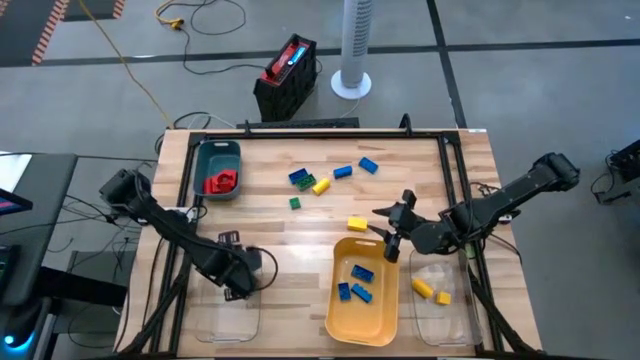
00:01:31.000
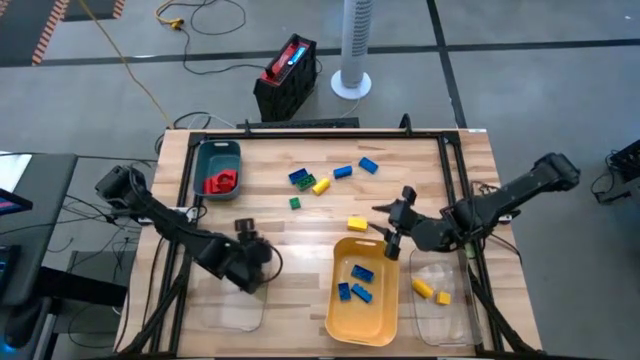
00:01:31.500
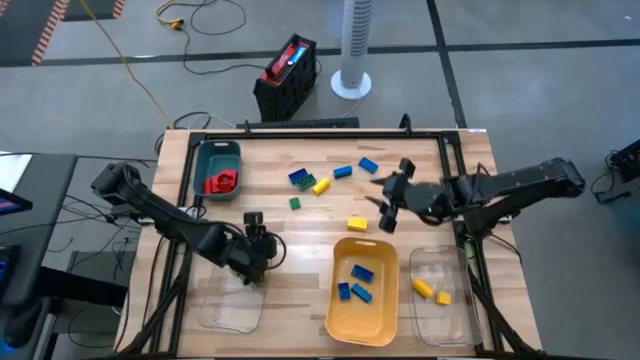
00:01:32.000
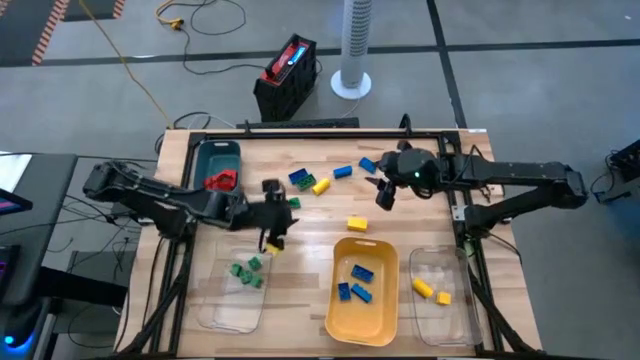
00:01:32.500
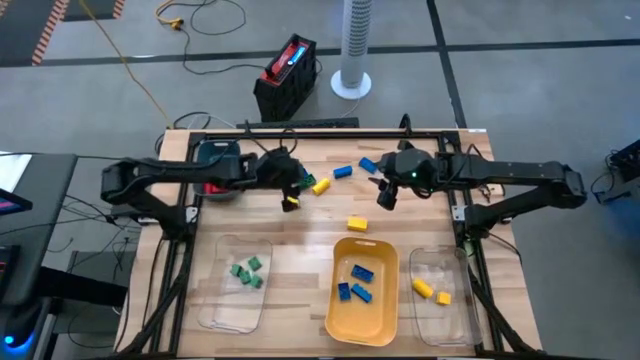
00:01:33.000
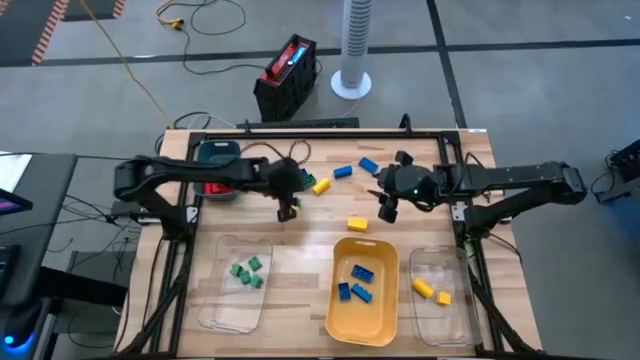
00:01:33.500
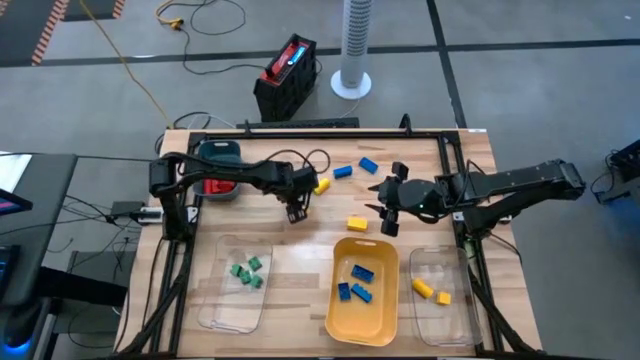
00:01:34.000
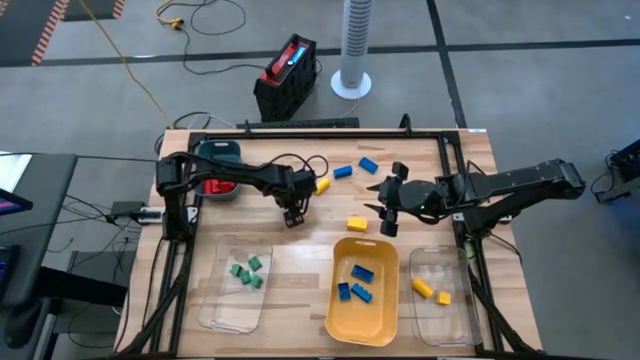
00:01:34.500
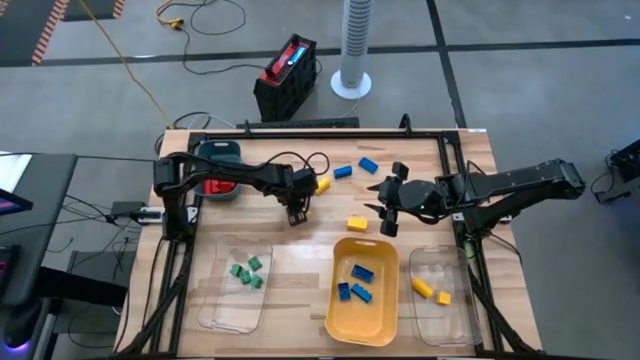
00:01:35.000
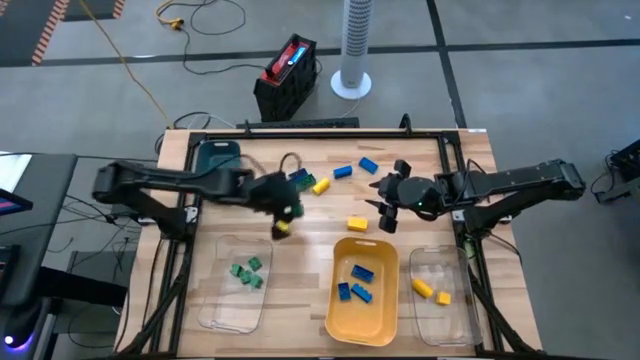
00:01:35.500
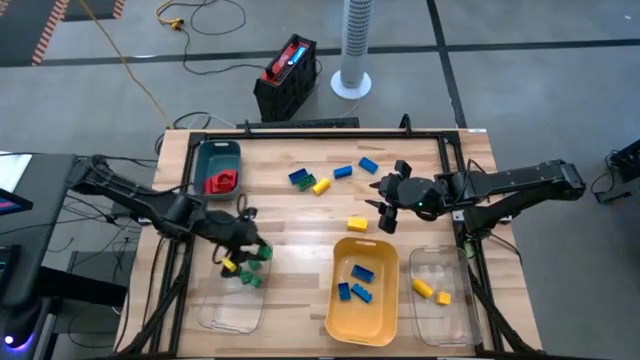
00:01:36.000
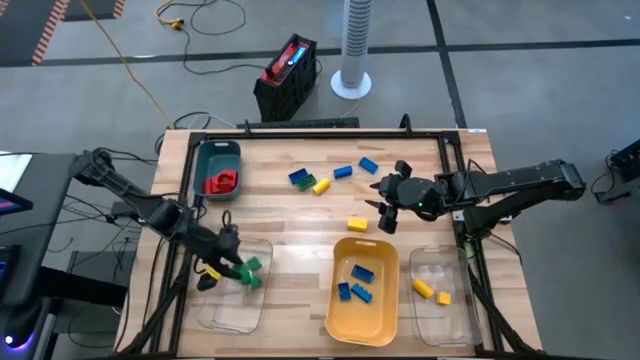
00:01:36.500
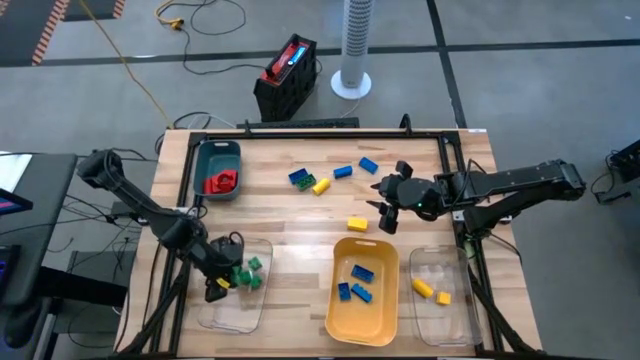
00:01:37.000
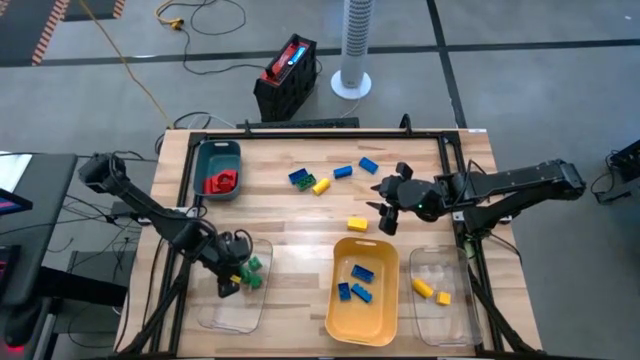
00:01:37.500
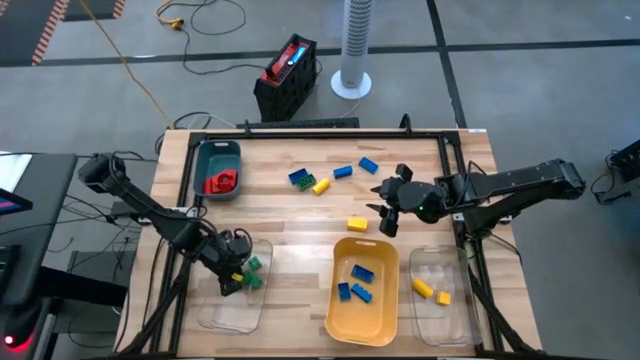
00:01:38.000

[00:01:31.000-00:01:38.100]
Task: Sort blocks
Put the green game piece into the left transparent bin

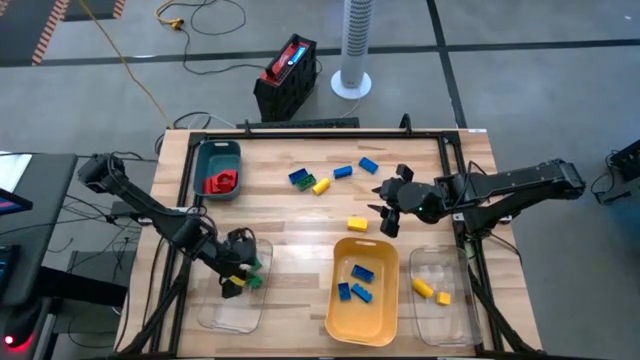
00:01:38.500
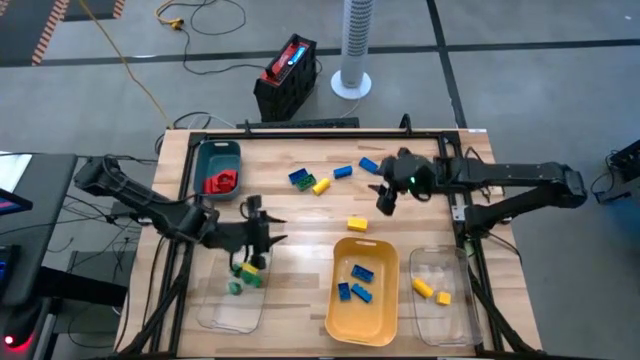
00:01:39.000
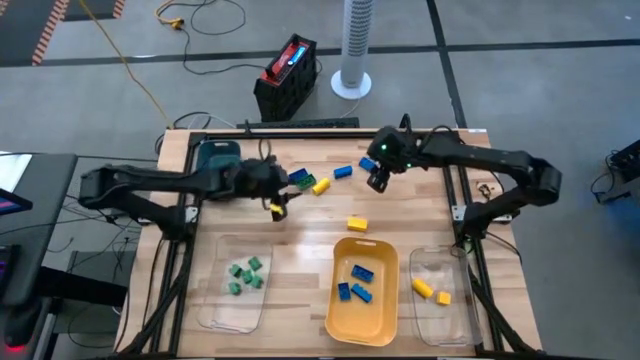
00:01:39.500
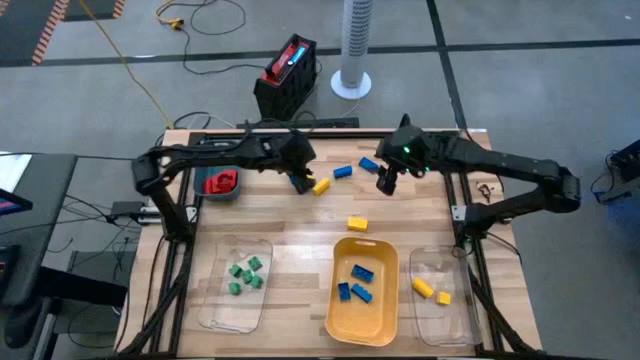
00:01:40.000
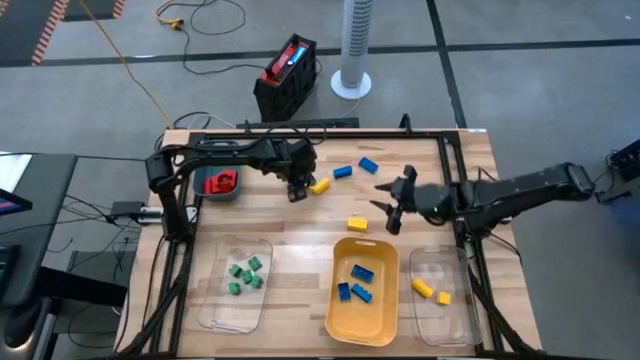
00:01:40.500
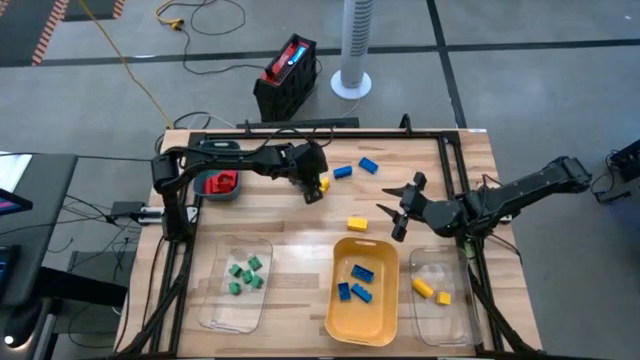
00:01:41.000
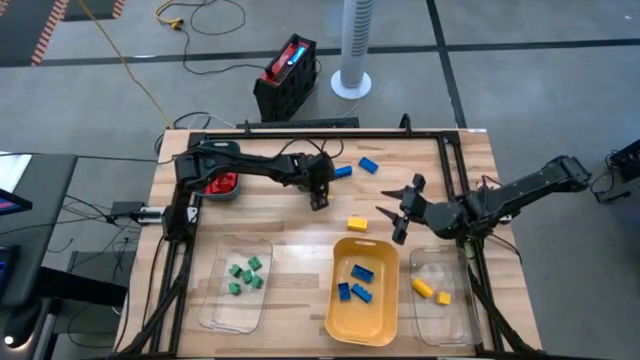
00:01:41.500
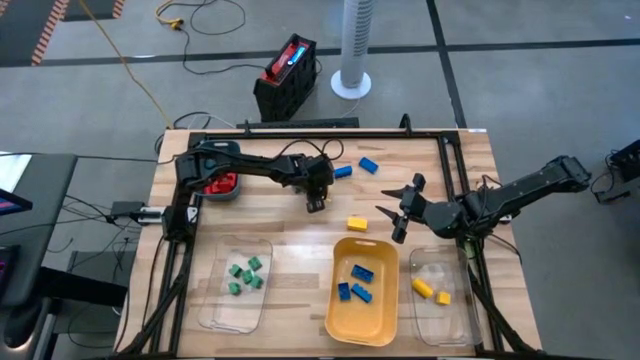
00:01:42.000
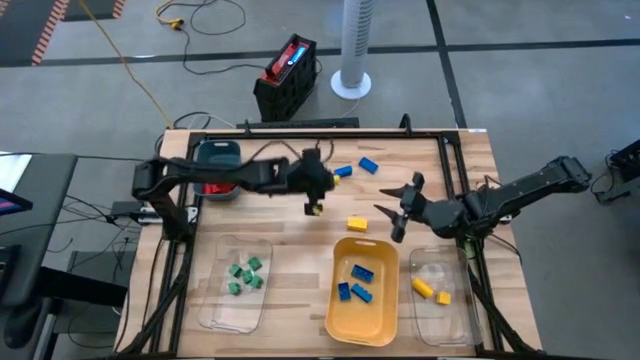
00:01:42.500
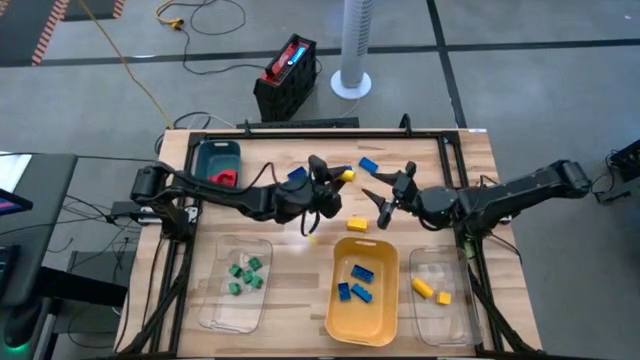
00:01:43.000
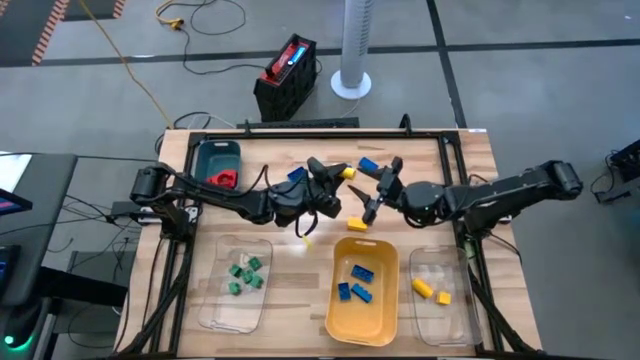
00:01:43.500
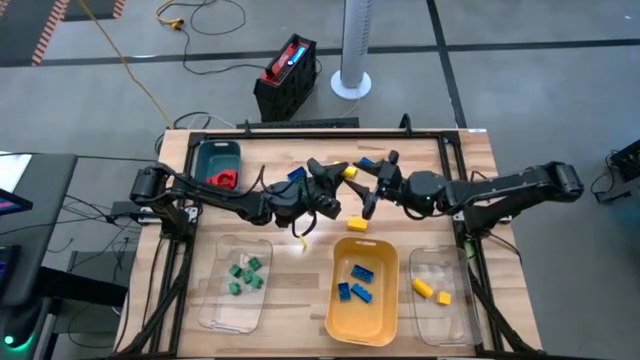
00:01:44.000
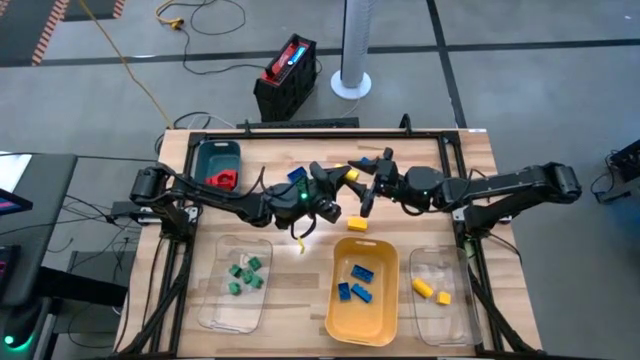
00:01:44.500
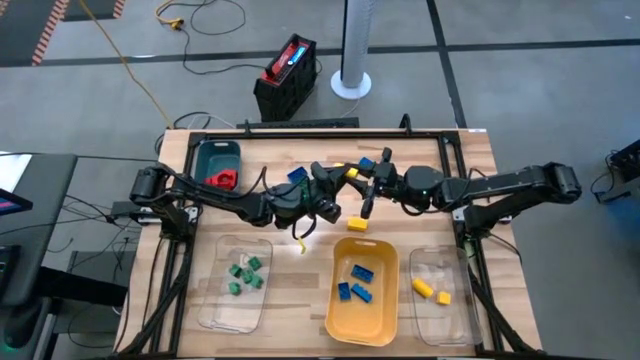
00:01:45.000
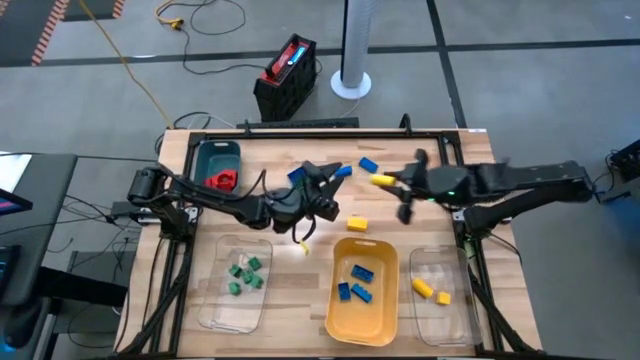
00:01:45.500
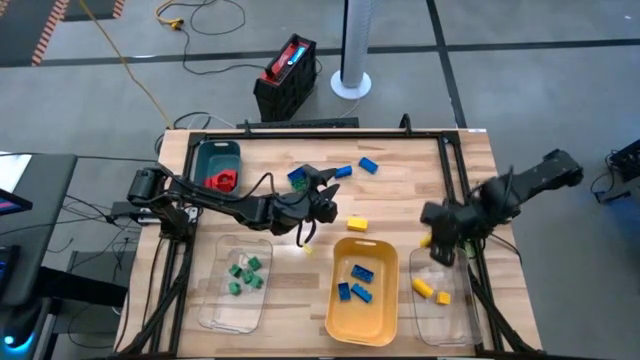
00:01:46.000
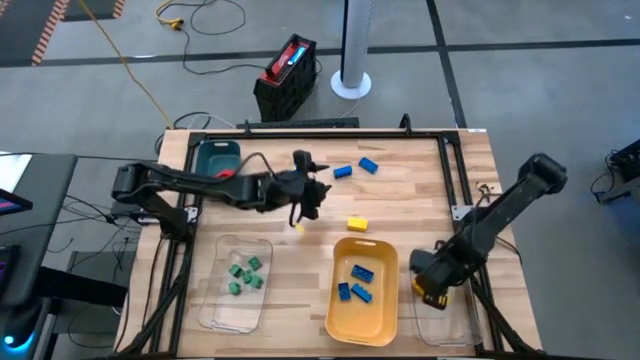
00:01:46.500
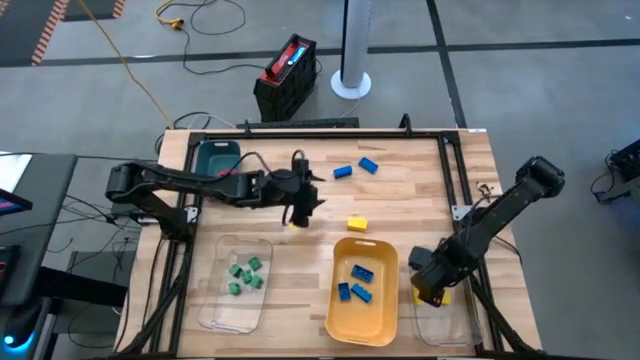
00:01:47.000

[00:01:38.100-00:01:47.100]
Put the yellow wooden block into the right transparent bin

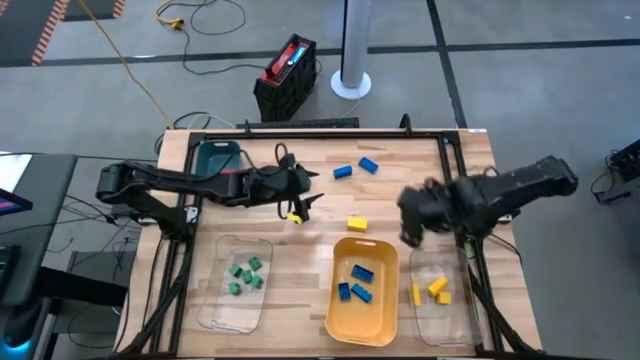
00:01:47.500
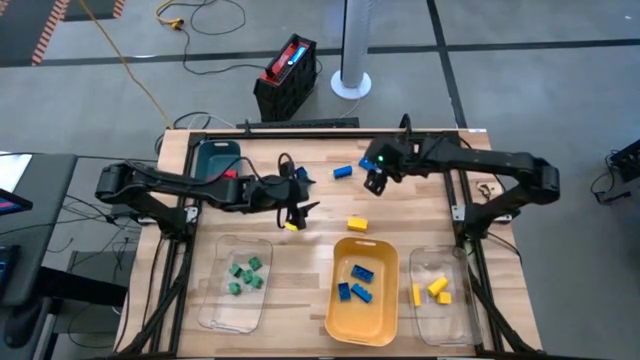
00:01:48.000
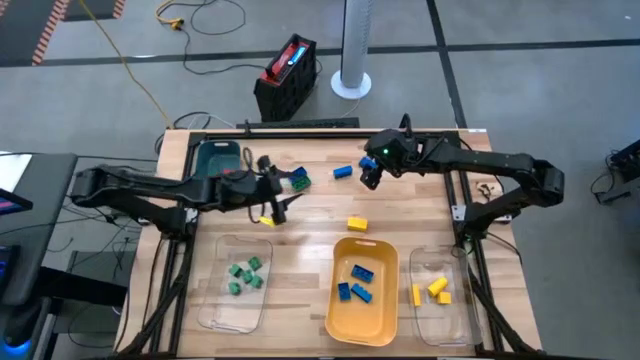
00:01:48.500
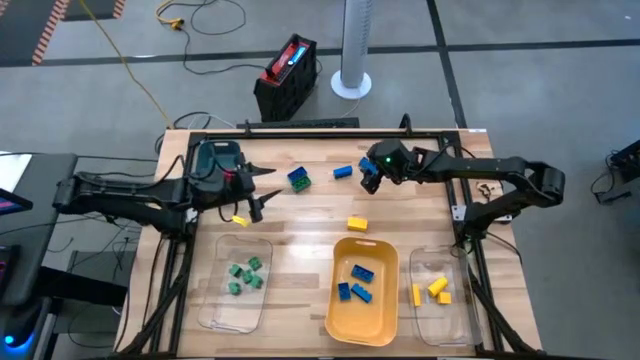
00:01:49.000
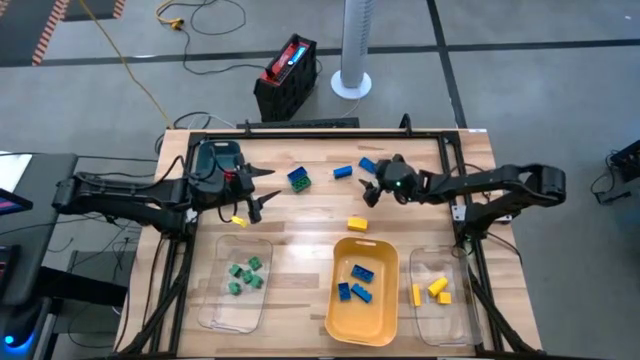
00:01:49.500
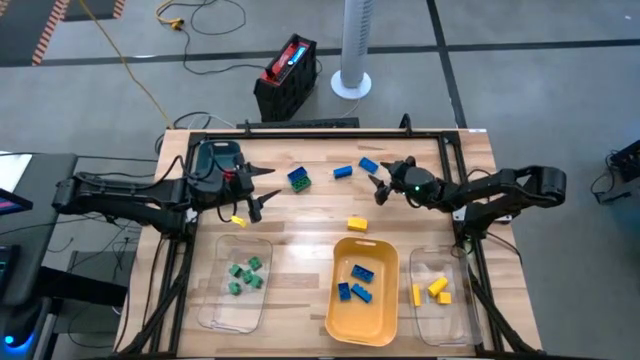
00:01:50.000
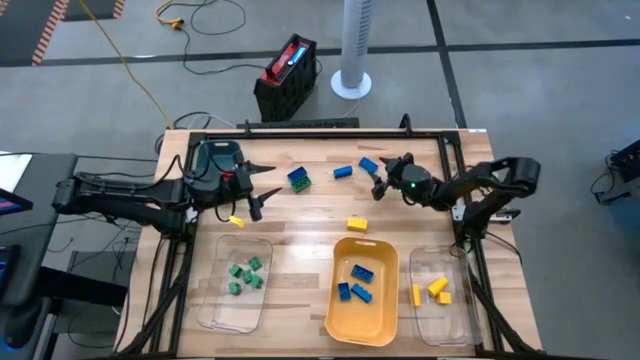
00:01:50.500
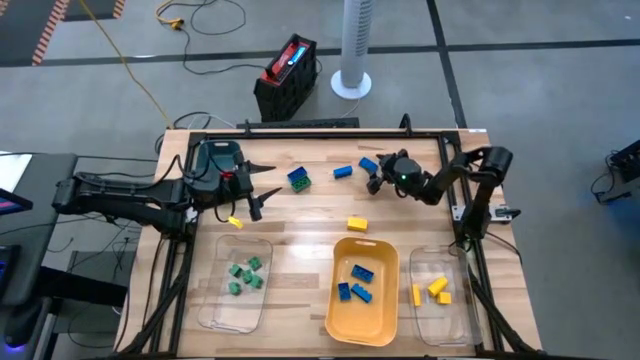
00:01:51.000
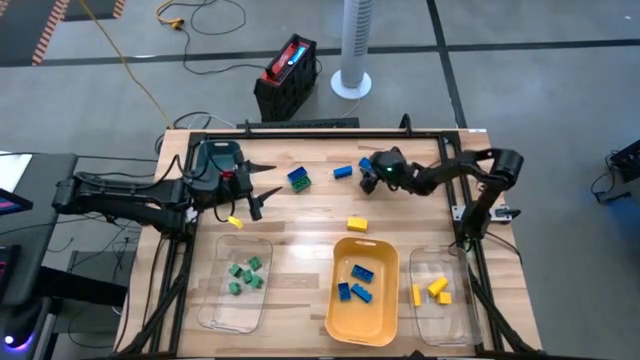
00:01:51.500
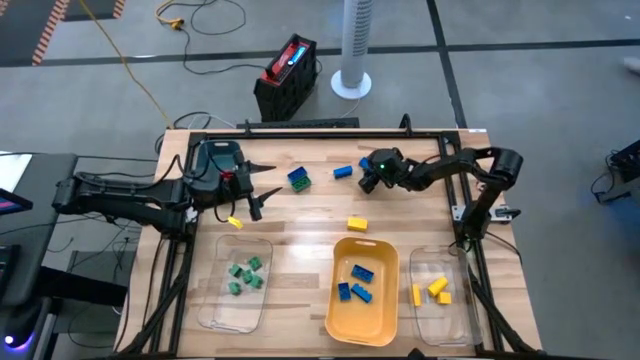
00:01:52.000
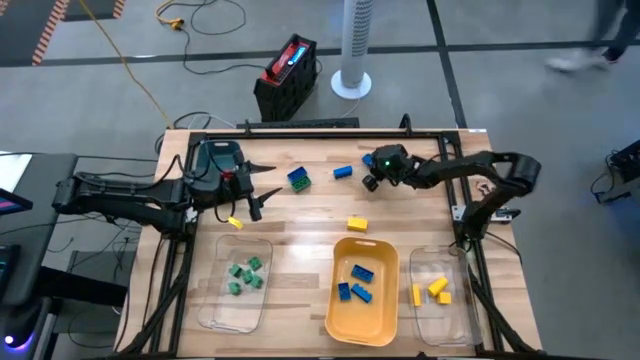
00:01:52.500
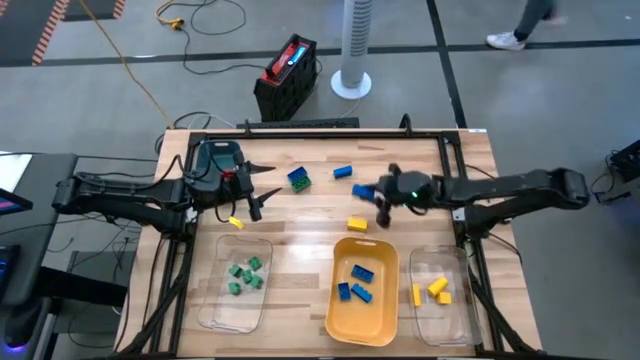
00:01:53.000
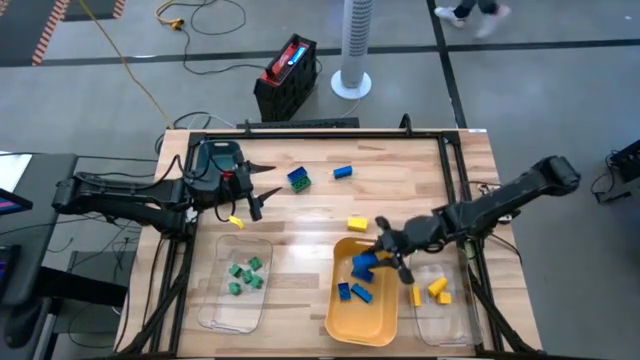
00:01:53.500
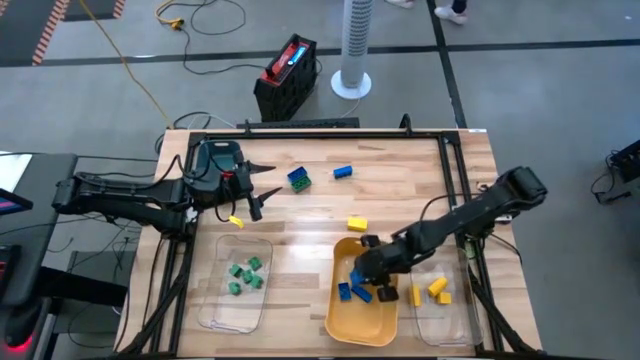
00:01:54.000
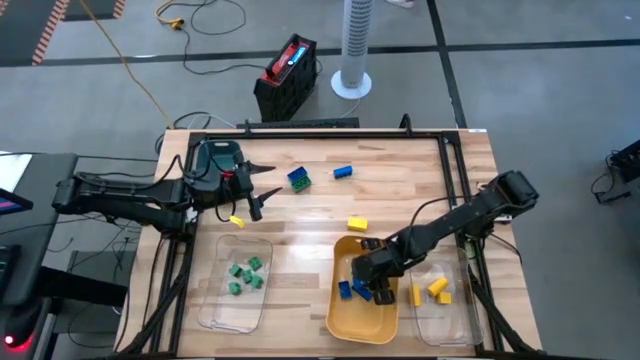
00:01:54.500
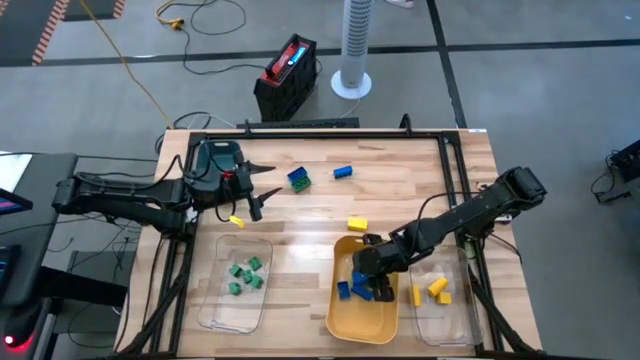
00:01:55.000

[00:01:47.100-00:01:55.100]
Put the blue game piece into the yellow bin
